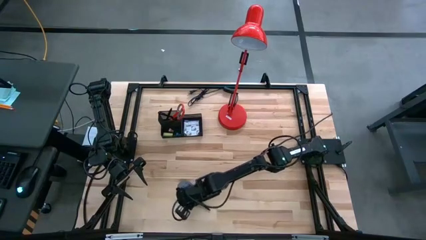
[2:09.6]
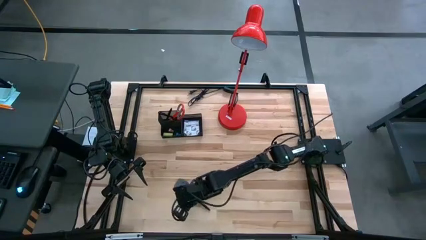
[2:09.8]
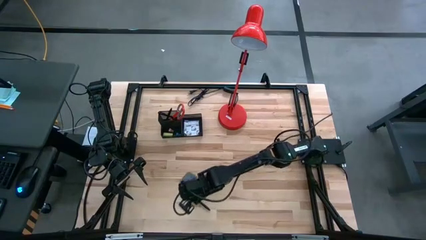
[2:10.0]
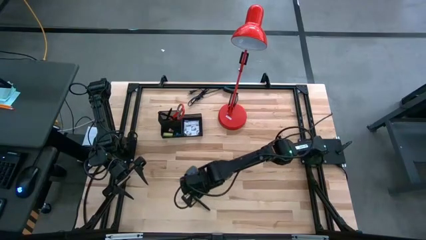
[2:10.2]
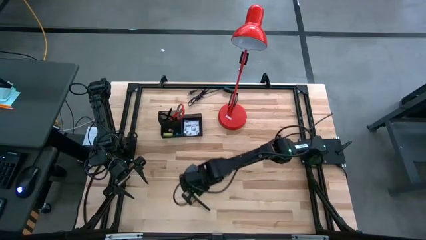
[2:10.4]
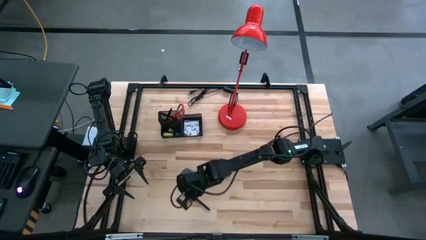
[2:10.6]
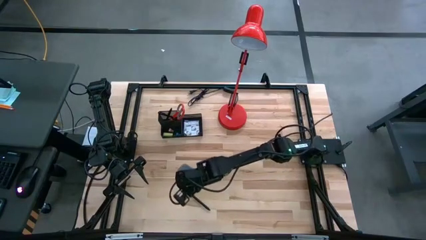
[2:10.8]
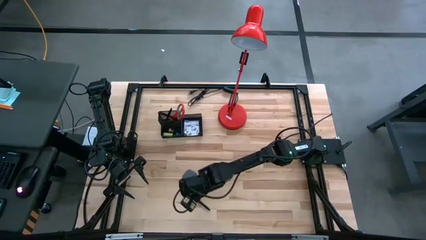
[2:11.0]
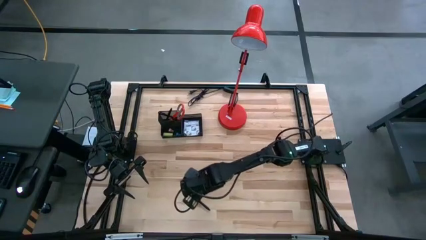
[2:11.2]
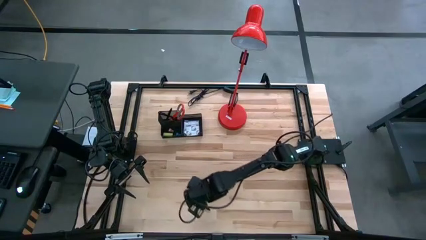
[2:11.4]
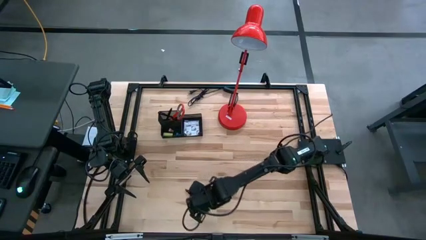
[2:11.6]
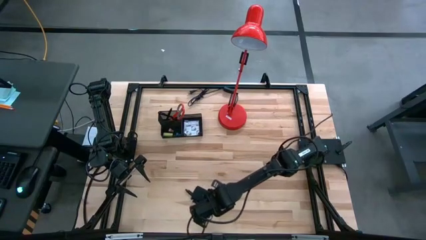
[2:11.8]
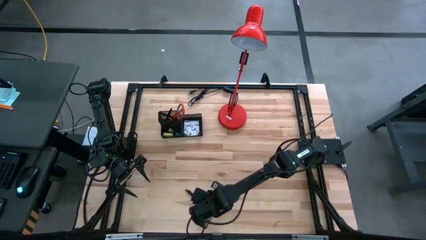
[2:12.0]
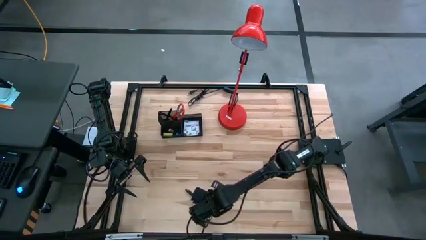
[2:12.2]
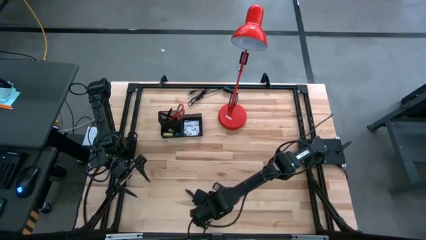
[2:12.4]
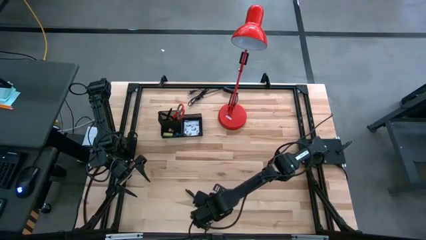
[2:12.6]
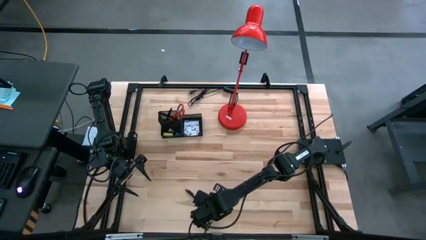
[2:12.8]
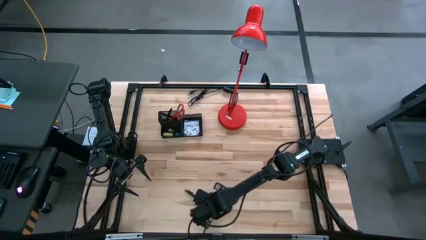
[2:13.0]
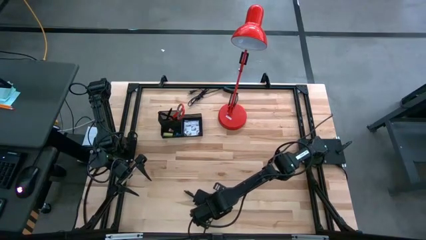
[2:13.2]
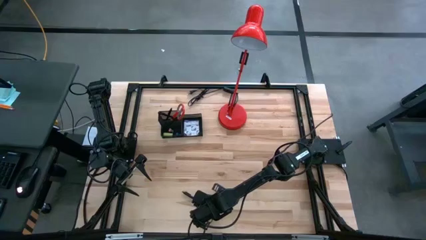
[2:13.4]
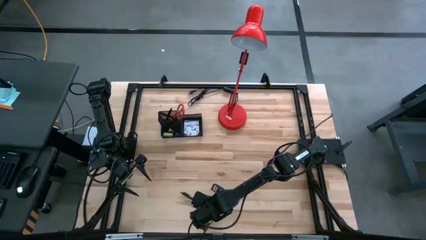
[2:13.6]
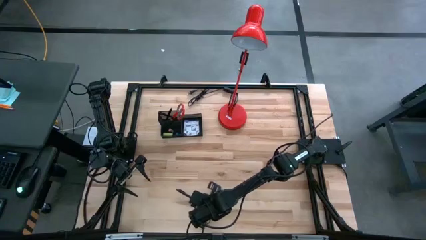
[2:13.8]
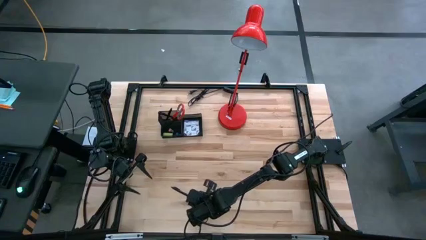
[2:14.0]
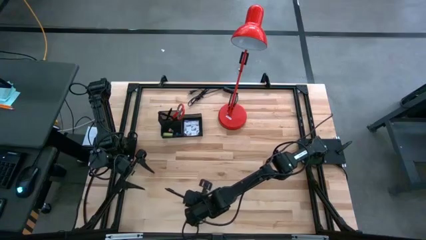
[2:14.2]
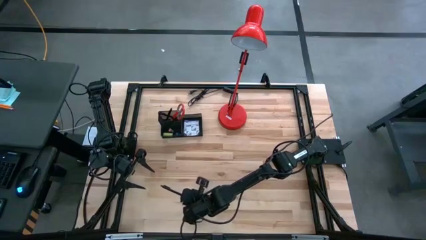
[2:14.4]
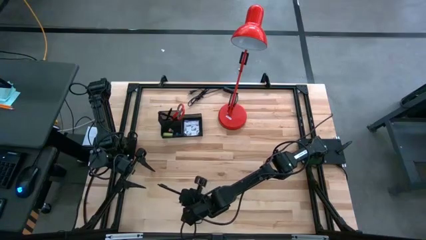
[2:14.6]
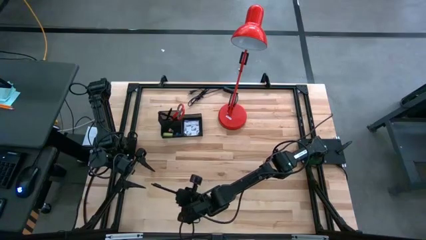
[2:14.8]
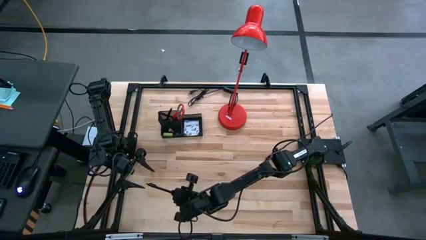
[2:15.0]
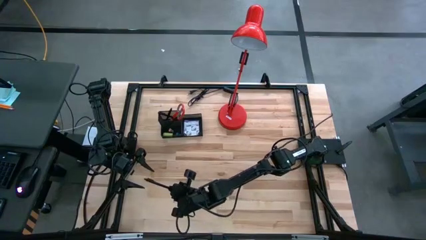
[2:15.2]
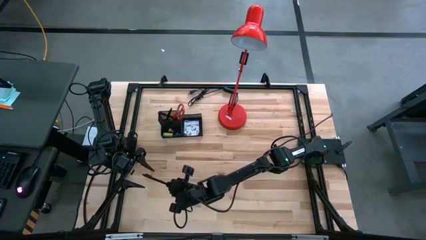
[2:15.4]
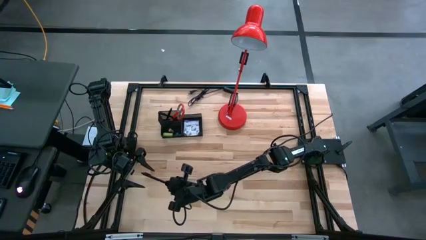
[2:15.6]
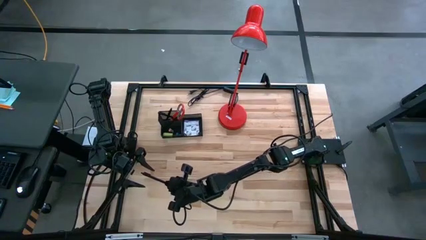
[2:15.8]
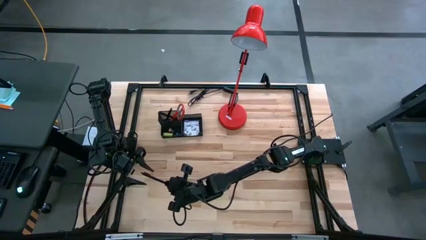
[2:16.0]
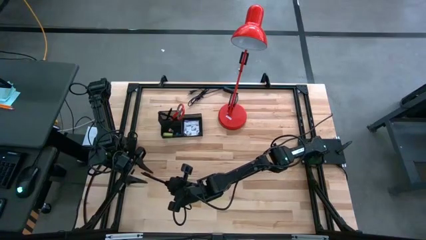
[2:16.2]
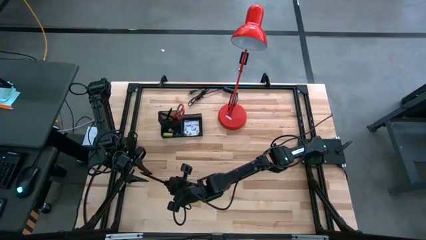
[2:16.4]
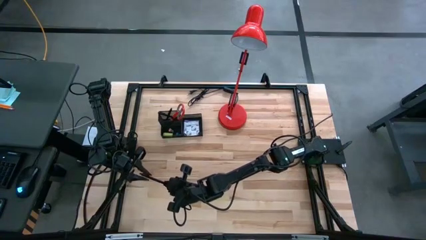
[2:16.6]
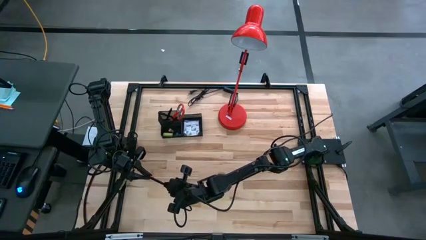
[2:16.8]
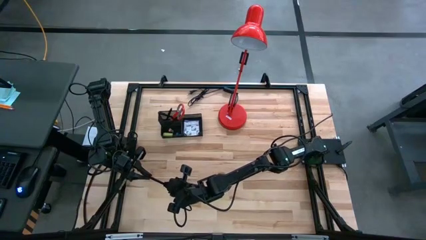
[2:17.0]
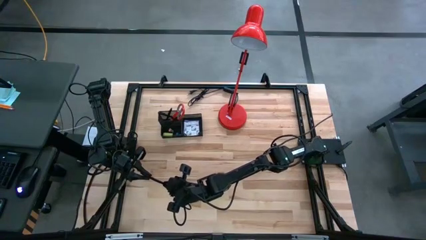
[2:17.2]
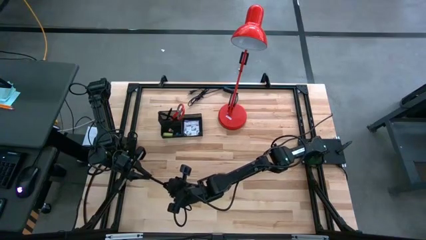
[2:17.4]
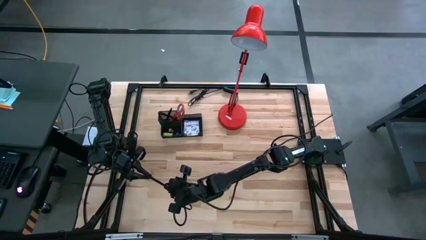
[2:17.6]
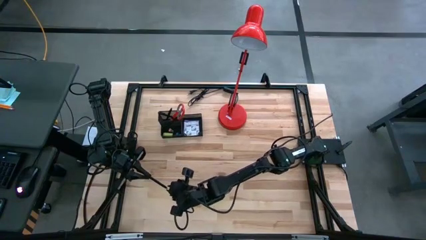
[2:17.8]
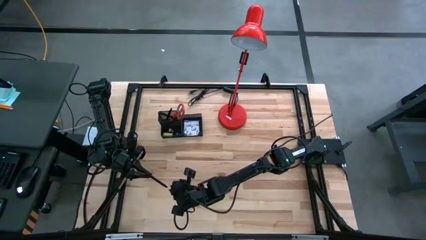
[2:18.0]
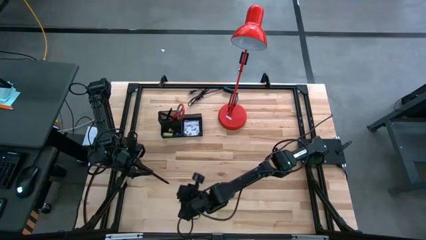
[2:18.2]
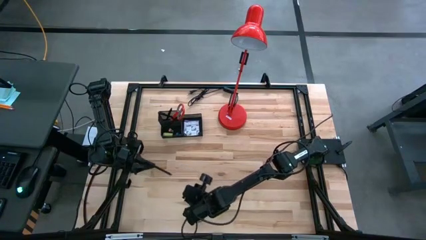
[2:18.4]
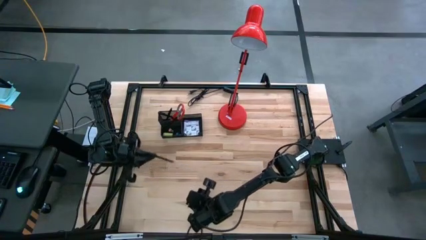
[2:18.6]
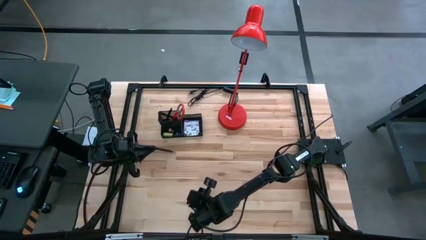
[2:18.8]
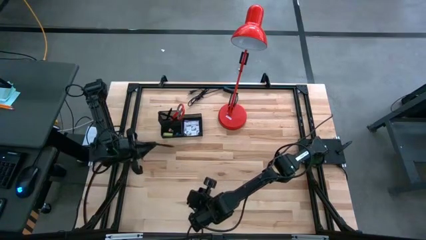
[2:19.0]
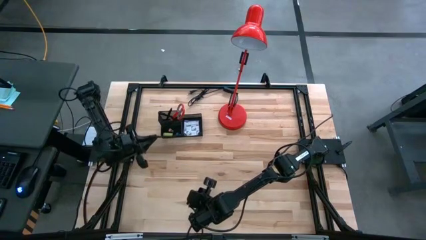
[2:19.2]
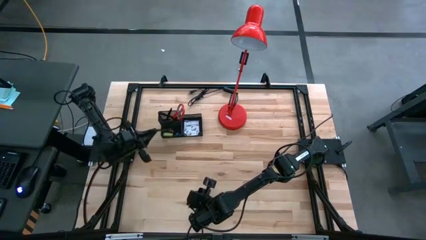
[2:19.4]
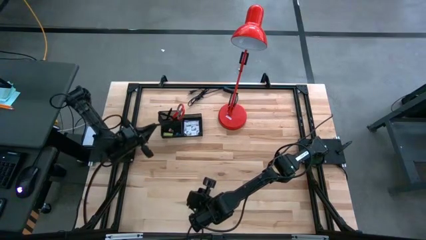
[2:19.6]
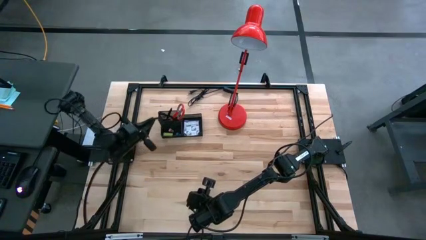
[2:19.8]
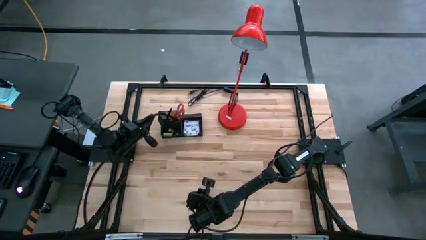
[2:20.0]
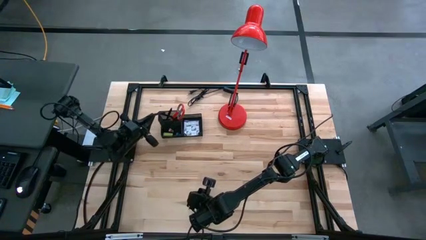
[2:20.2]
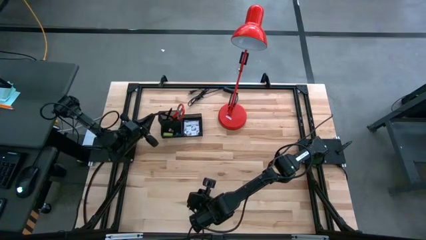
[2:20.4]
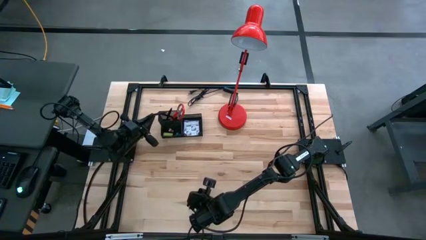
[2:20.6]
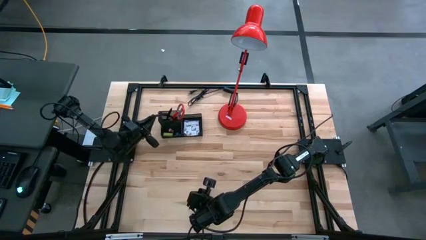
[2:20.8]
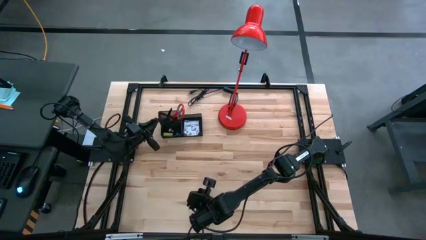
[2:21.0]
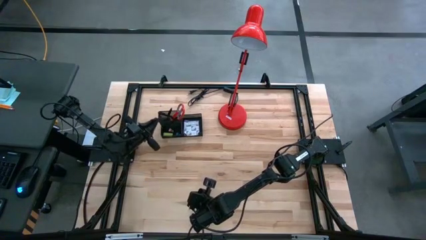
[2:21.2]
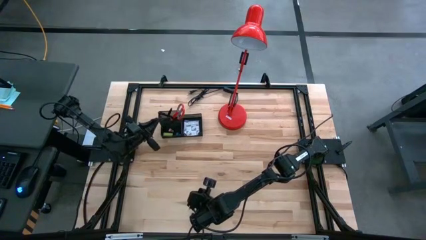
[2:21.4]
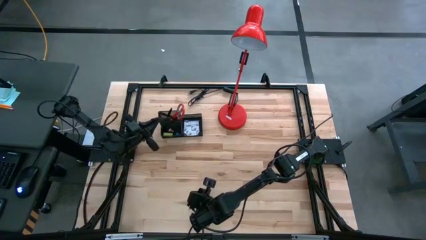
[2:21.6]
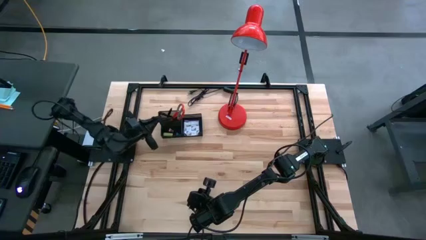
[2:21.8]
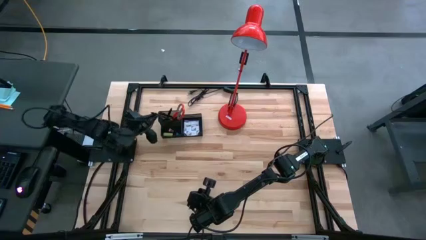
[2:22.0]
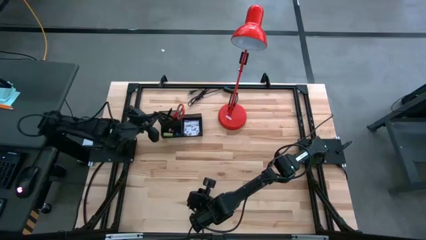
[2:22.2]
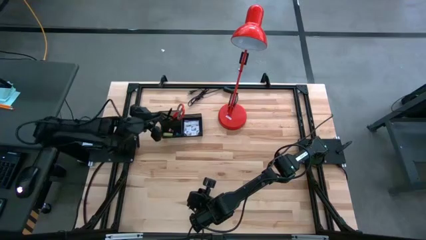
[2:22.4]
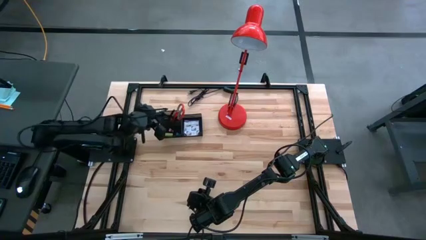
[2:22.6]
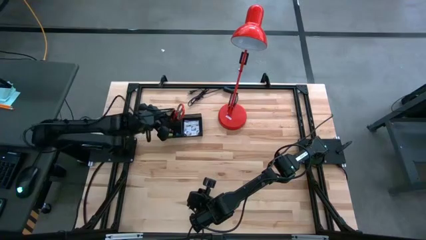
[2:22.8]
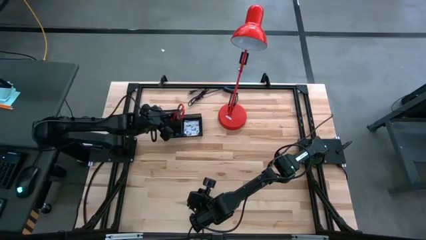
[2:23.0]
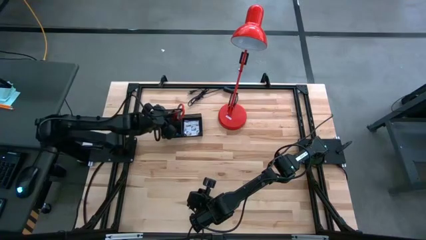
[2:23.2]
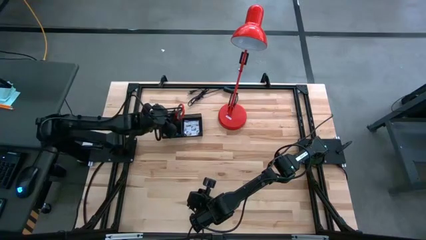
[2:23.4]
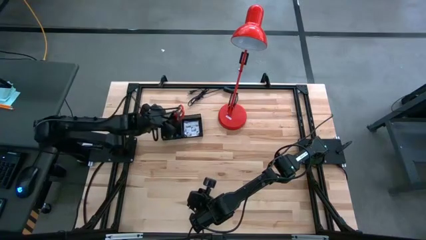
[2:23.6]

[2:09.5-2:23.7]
Task: Pick and place office supplies into organizer
Put the black pen into the black desk organizer
